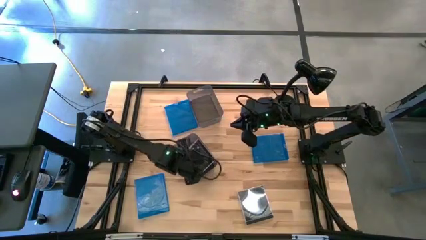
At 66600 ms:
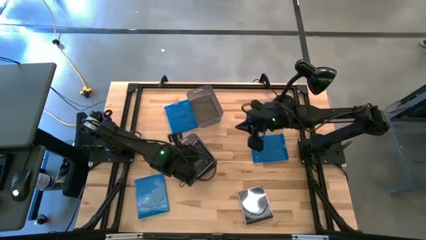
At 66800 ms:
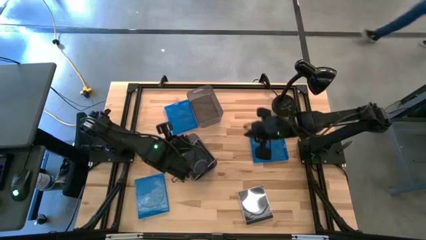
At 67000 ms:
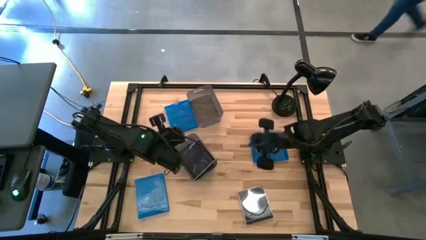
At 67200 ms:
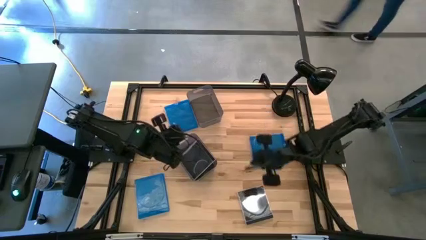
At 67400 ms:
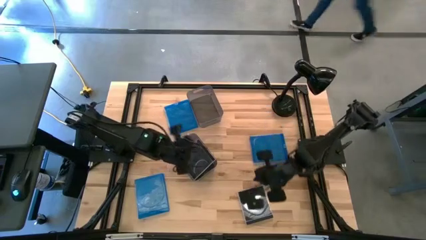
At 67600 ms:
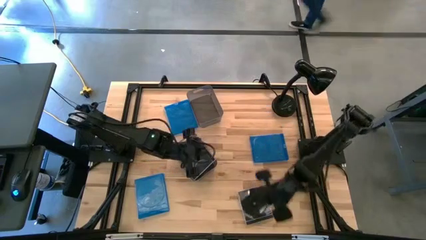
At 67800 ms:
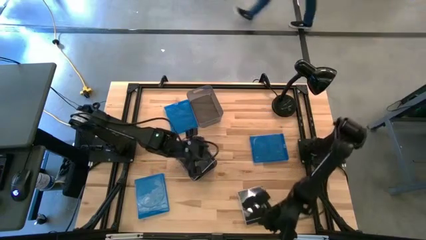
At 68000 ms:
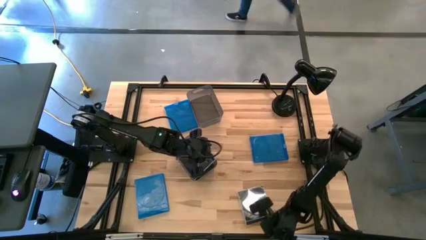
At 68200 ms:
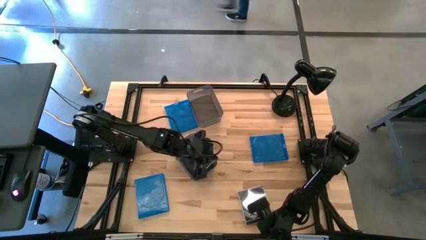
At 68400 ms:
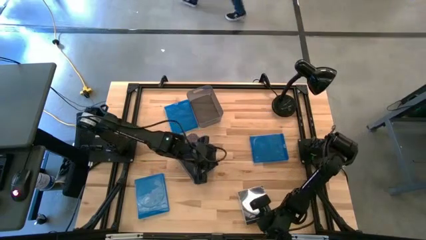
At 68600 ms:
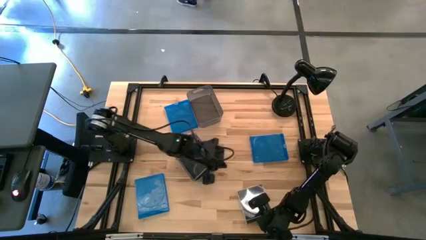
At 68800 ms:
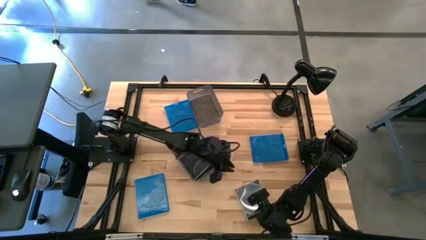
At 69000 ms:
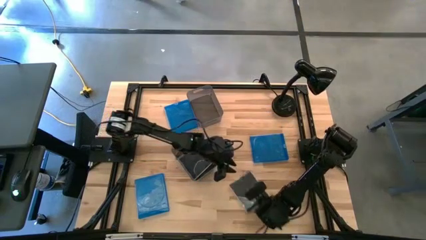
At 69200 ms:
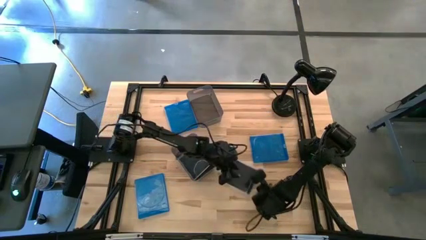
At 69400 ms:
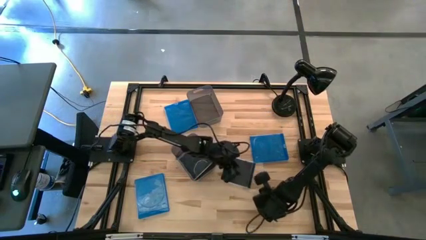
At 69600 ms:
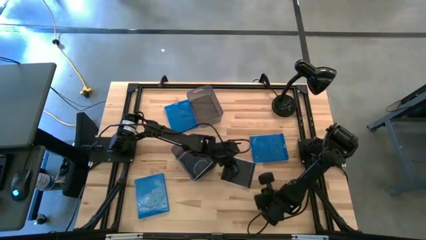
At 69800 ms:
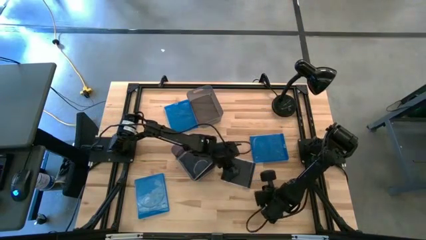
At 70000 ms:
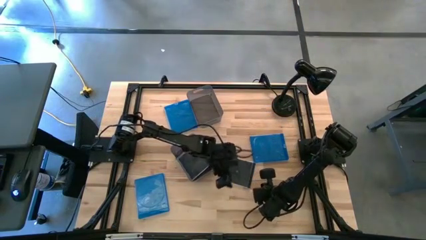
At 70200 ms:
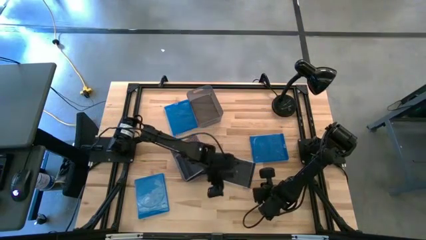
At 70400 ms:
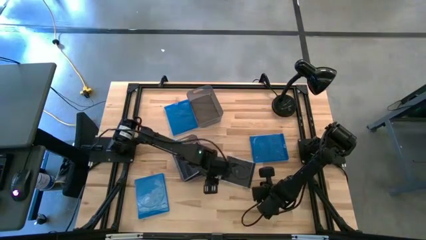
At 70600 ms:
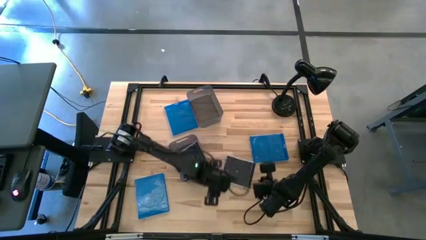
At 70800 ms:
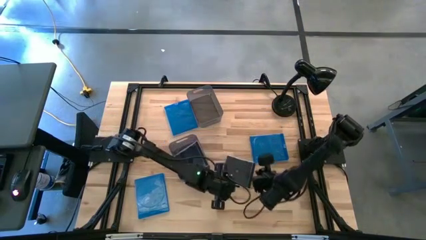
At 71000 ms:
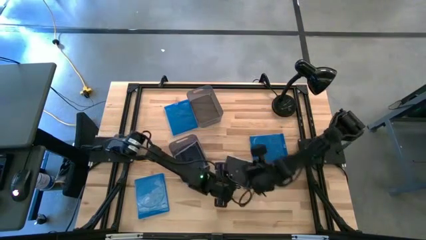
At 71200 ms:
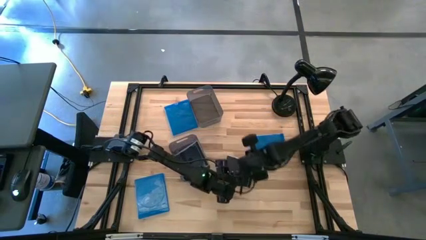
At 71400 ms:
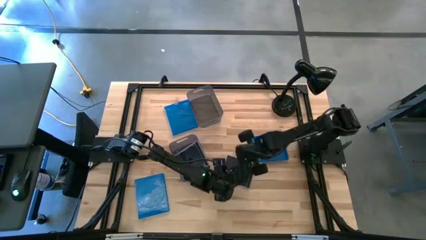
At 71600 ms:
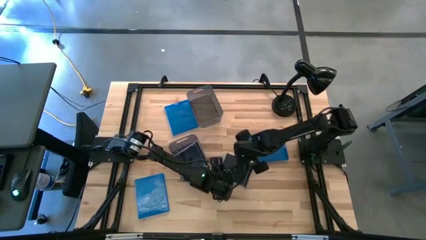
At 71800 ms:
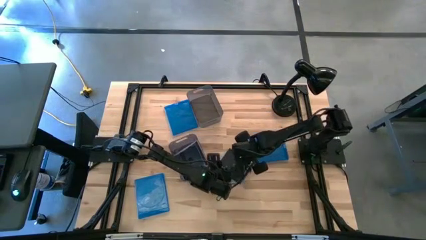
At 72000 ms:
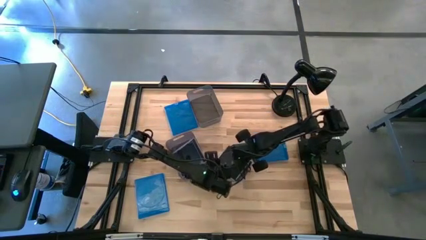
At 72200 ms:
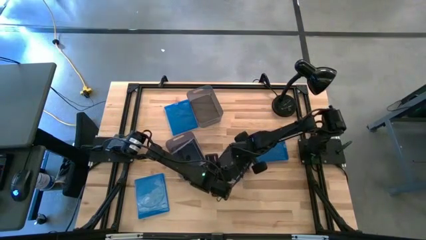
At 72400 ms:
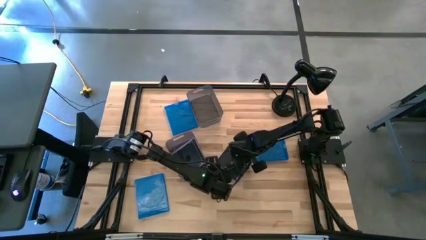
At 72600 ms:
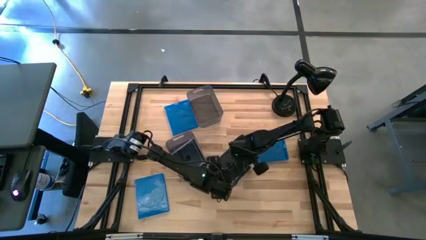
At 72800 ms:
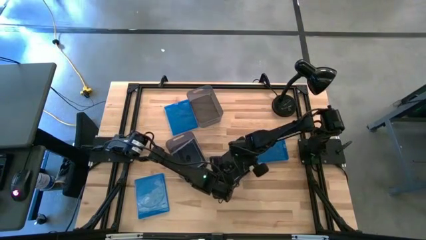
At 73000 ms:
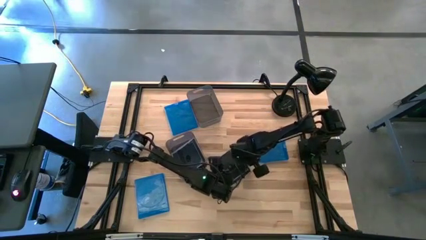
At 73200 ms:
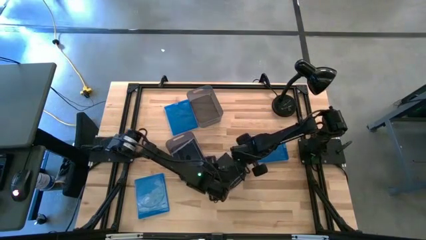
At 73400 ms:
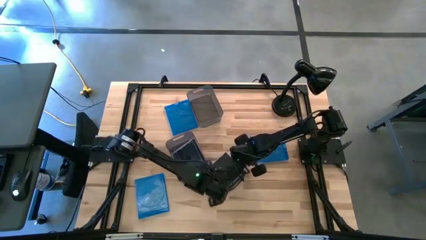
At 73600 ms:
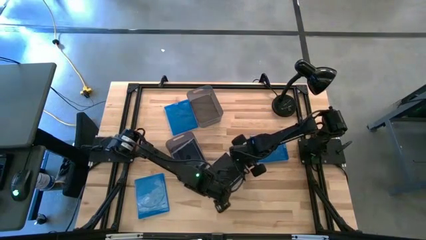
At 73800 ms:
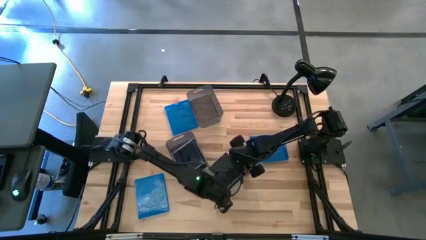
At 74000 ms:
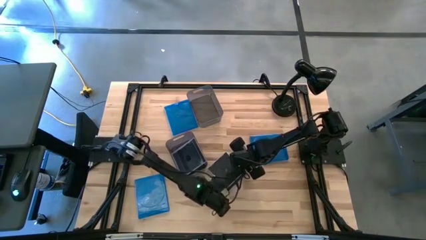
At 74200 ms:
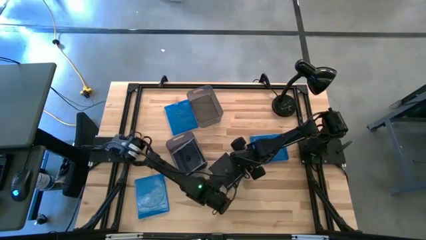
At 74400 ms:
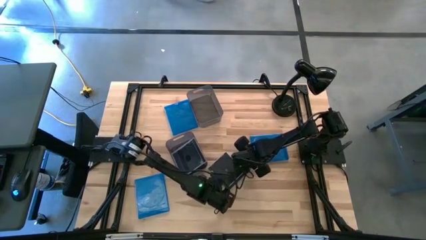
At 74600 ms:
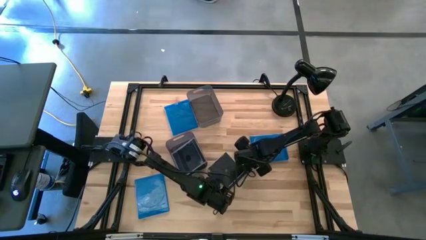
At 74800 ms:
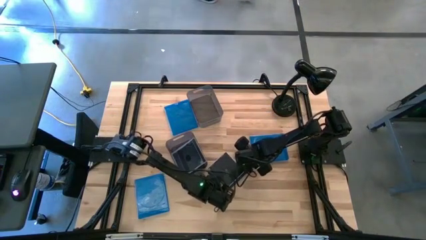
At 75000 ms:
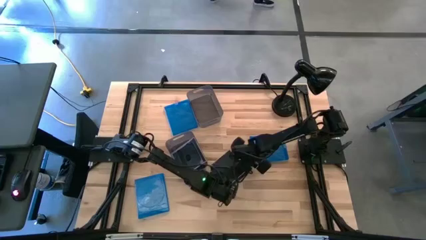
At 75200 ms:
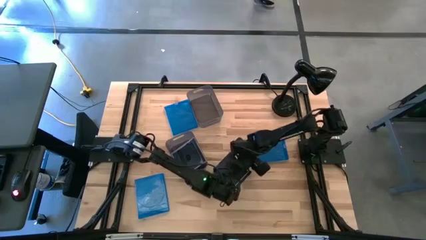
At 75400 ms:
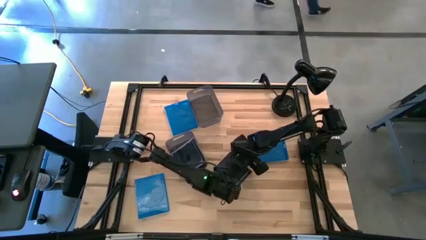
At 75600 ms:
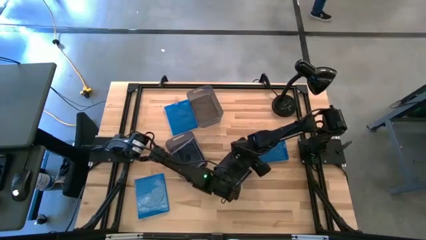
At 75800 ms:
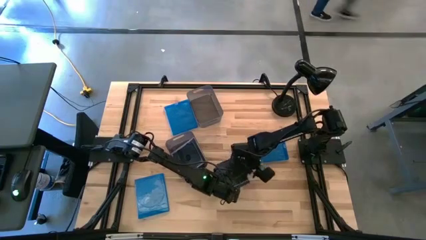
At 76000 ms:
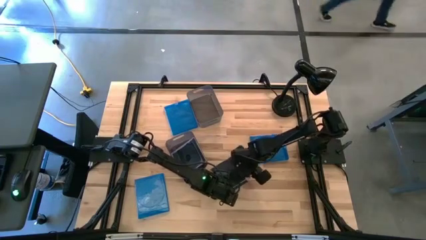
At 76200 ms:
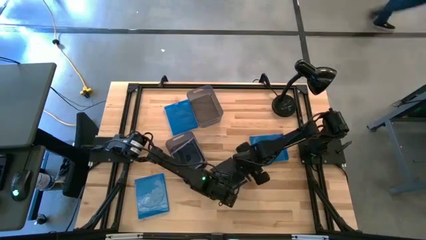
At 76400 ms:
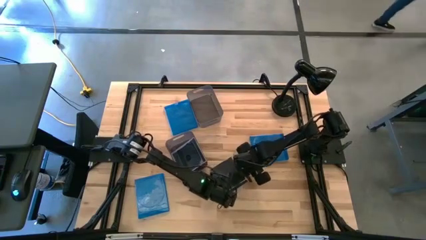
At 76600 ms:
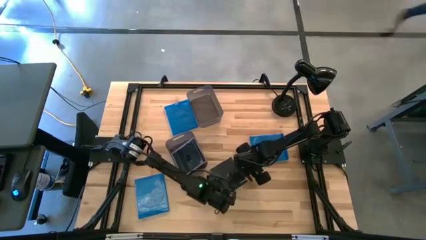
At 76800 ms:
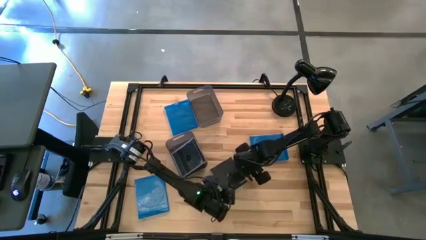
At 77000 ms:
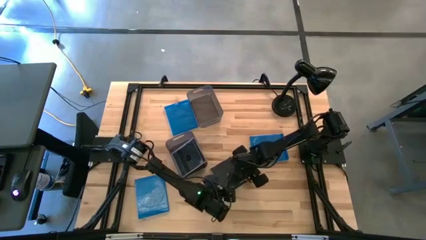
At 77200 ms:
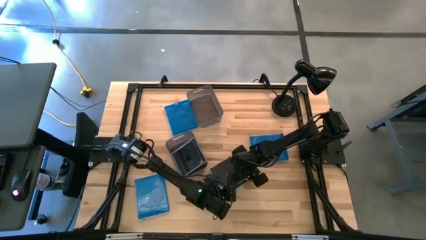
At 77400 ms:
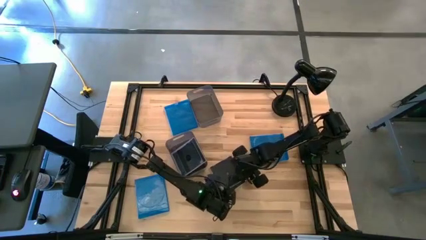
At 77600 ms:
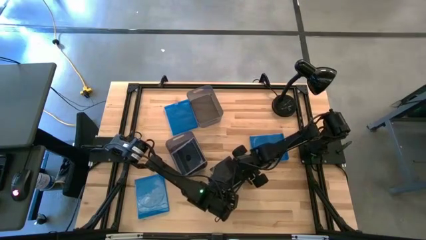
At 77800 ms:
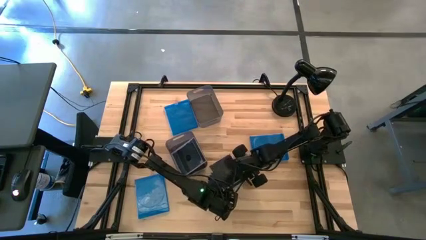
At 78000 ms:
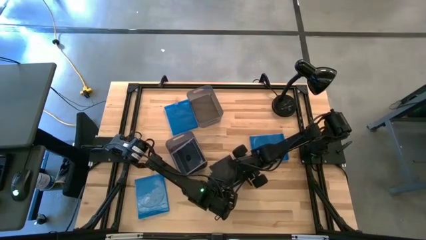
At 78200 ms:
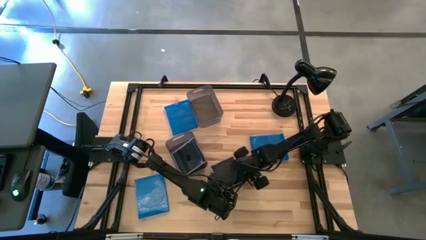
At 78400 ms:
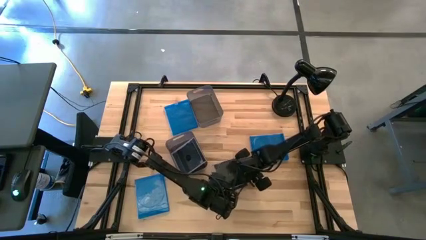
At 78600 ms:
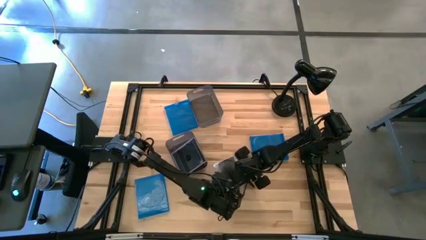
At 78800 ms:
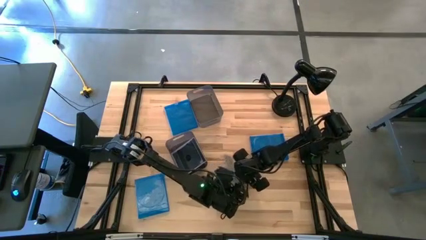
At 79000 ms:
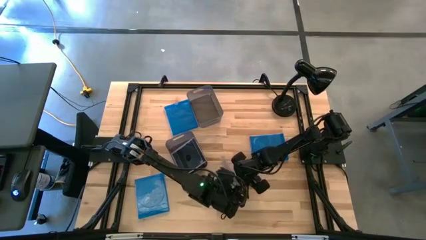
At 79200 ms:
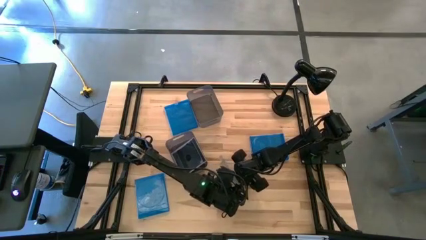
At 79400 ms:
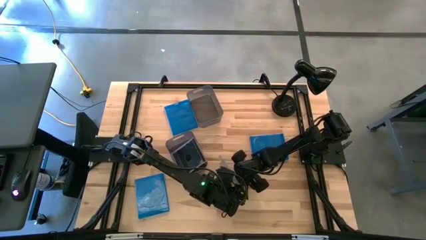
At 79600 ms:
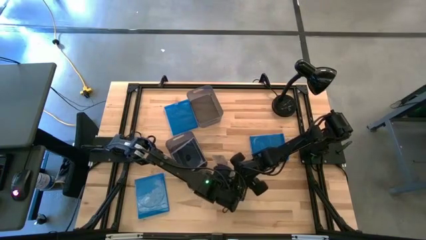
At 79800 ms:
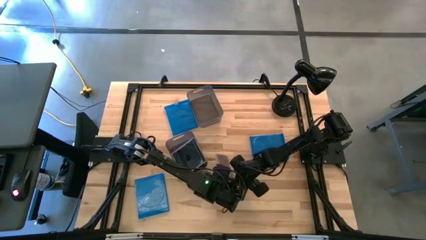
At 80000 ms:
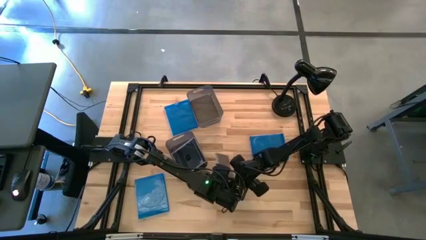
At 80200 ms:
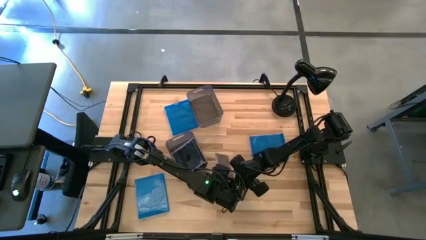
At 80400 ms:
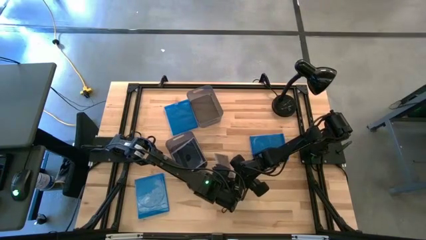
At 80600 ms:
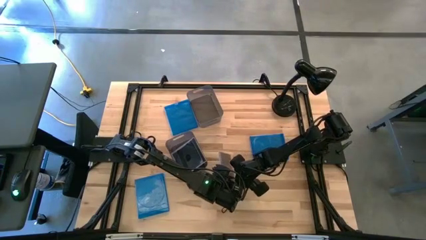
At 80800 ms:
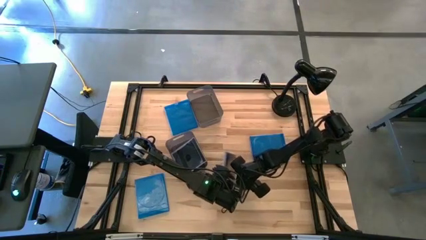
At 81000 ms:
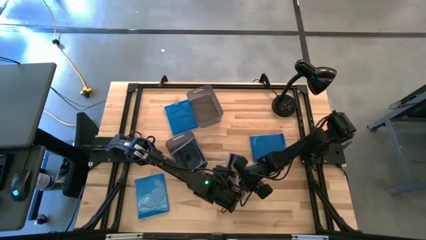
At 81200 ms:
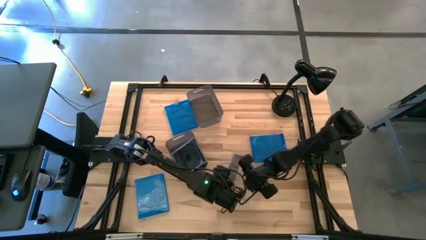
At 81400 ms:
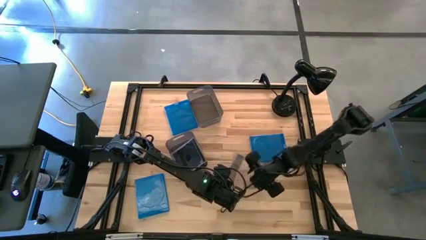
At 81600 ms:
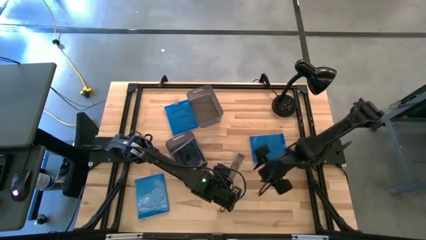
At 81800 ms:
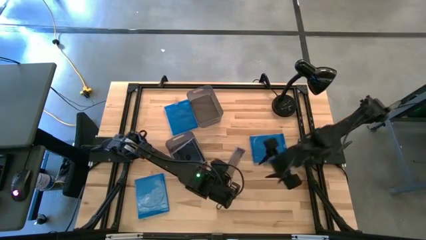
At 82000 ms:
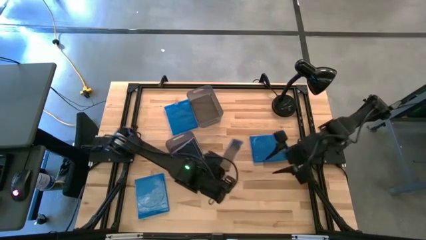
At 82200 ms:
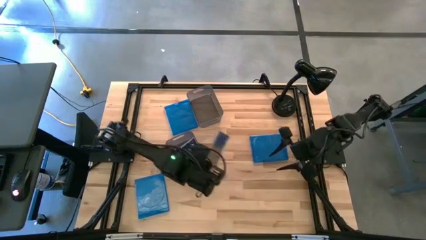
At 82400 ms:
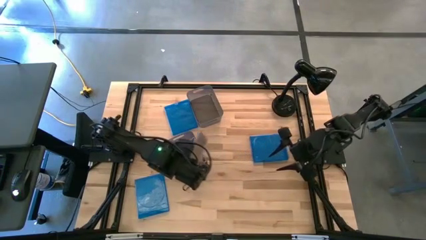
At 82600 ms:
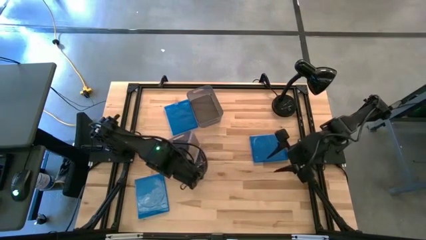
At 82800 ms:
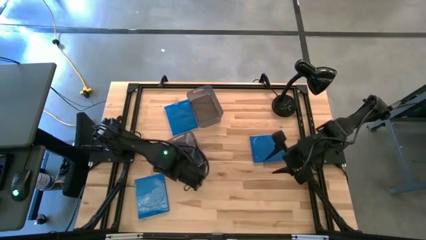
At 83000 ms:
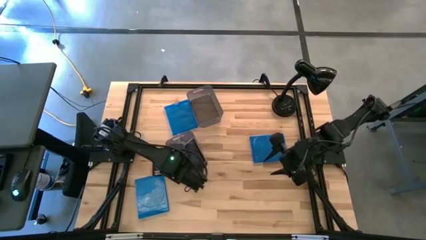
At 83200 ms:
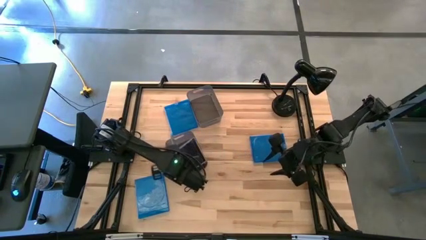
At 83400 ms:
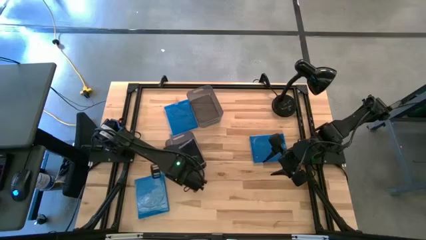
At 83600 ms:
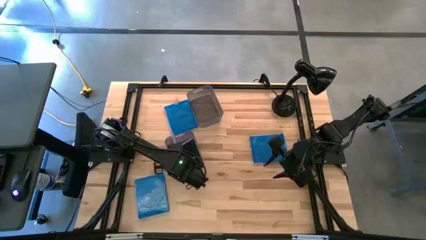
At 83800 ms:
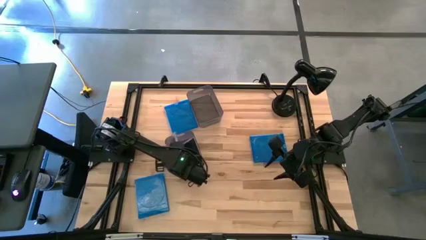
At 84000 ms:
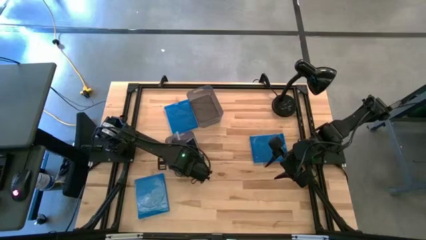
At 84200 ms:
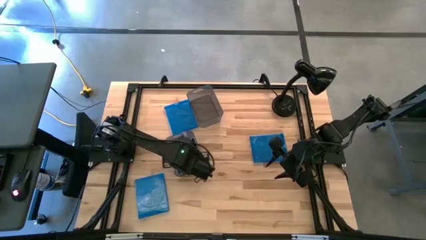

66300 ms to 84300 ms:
Task: Pick & place jewel cases by type
Put the black CD case into the bottom black bin
